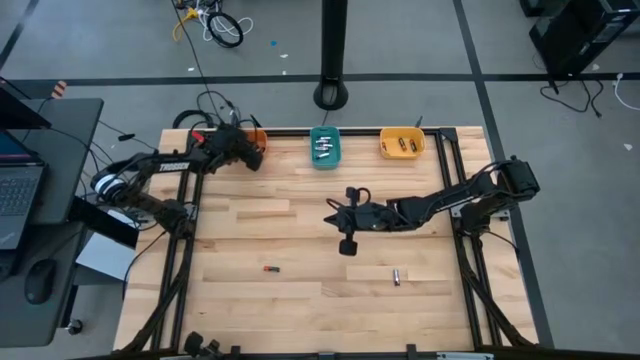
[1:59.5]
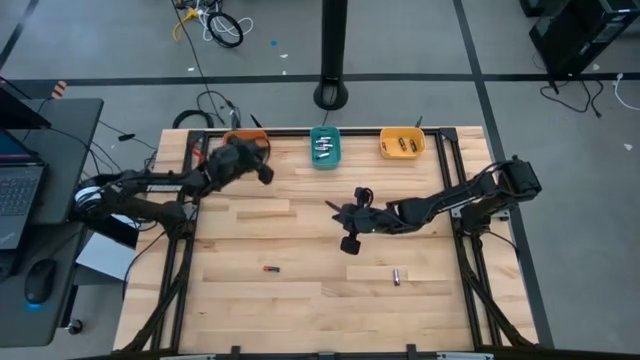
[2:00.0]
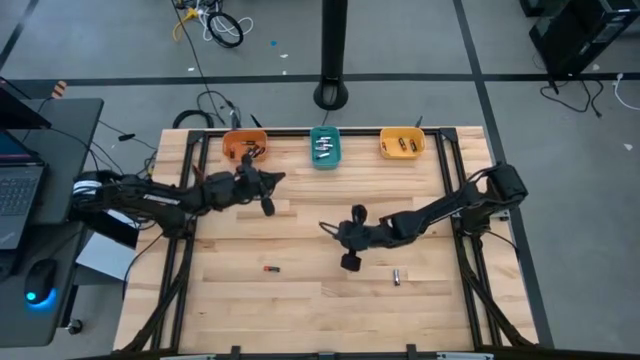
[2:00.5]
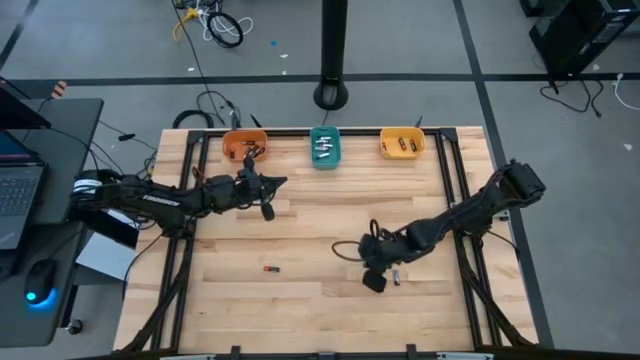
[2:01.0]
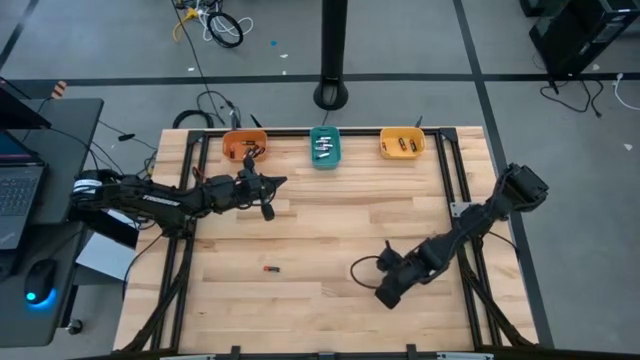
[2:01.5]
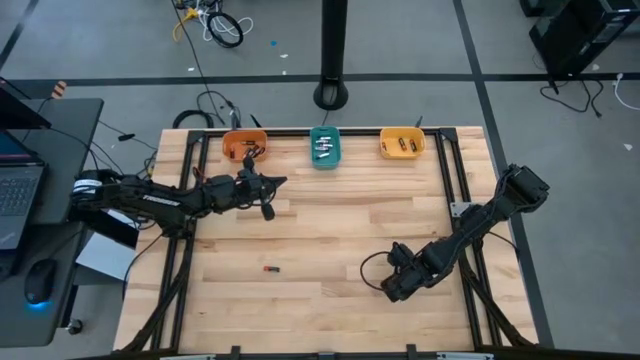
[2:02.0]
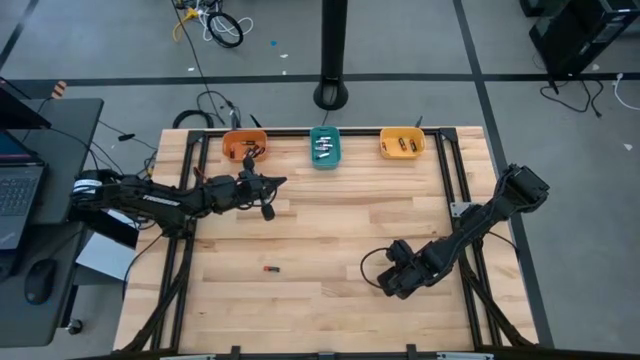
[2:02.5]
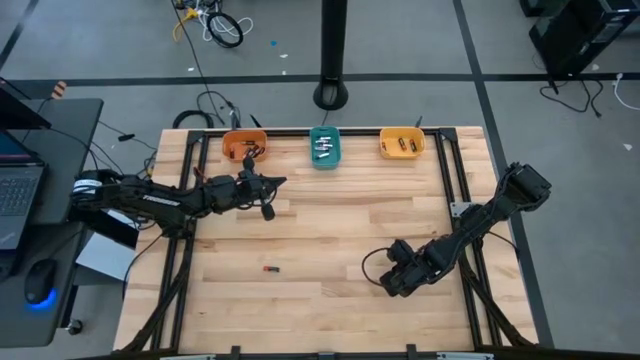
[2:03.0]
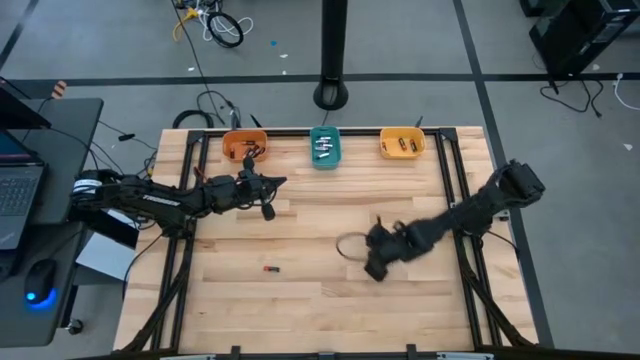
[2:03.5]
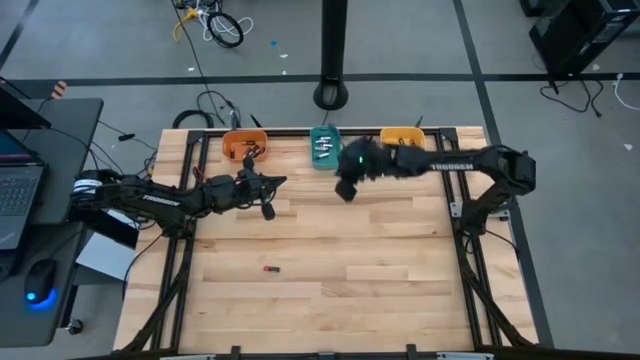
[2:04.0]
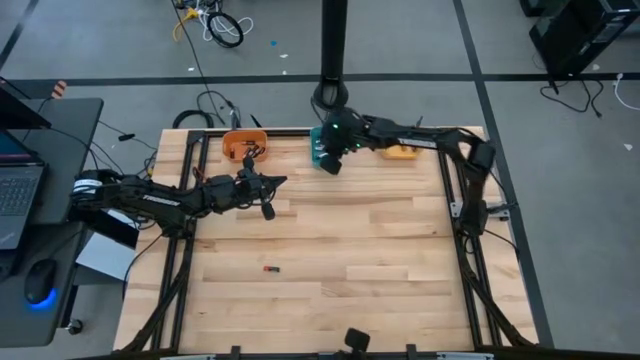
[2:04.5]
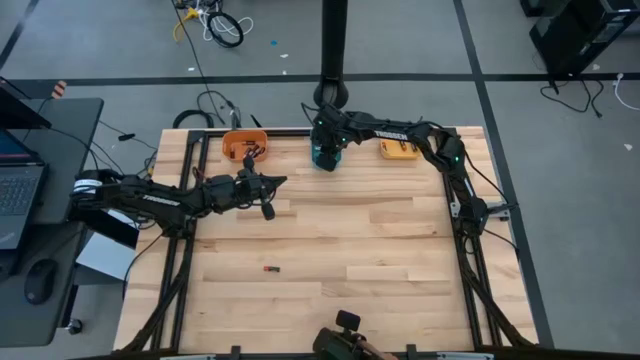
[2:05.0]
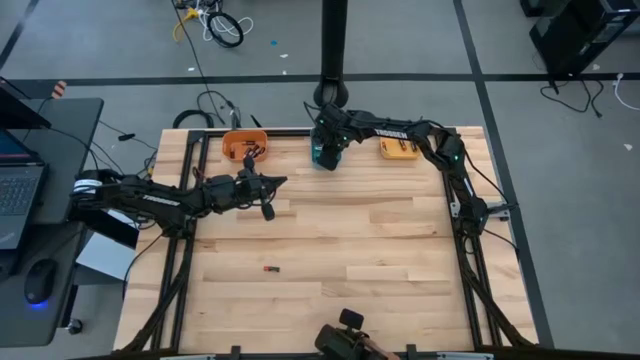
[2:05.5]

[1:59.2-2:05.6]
Task: Sort batteries
Put the black-silver battery in the green bin

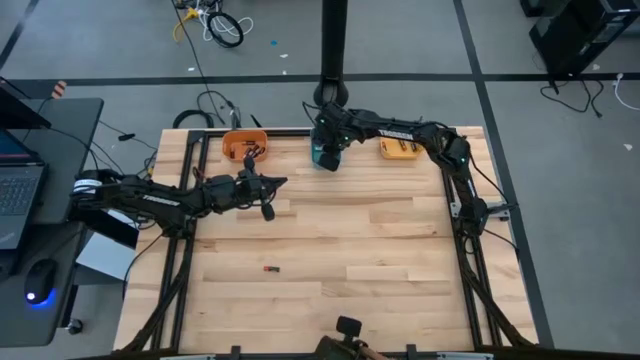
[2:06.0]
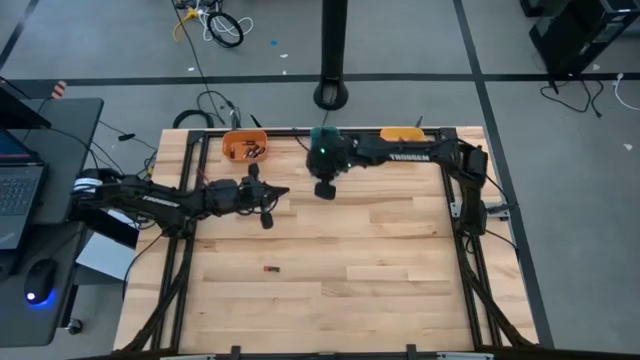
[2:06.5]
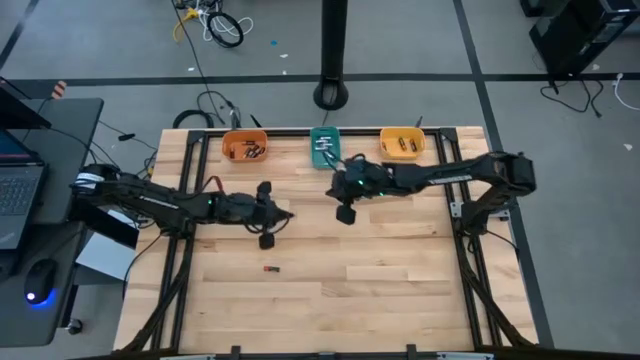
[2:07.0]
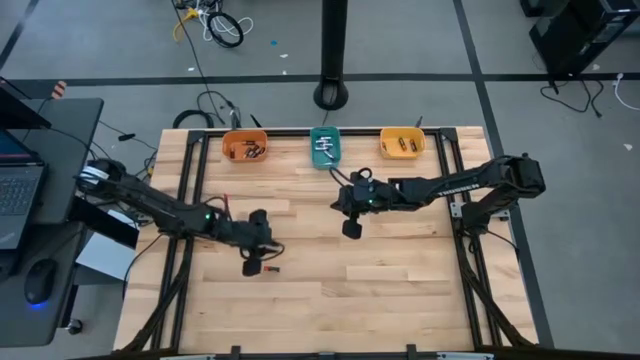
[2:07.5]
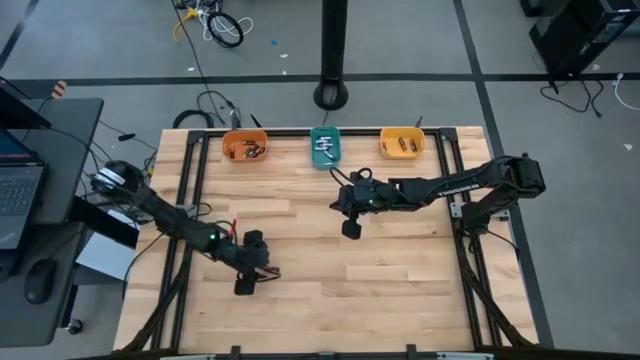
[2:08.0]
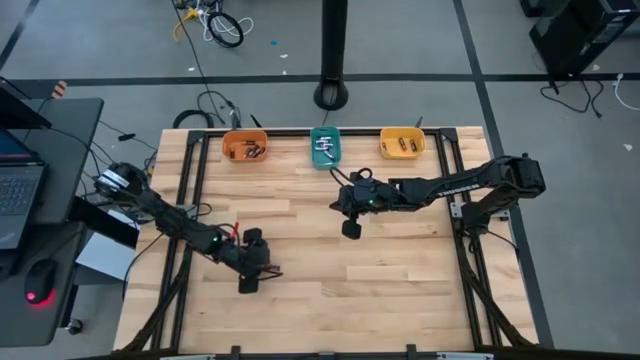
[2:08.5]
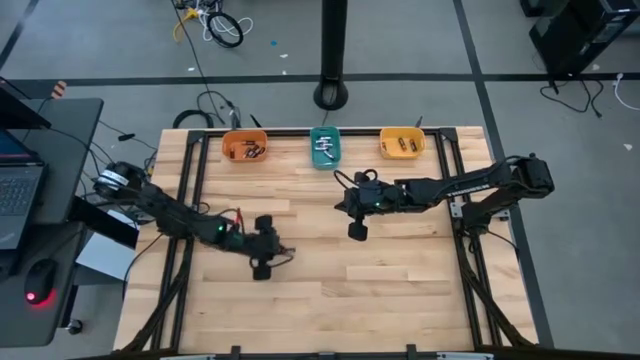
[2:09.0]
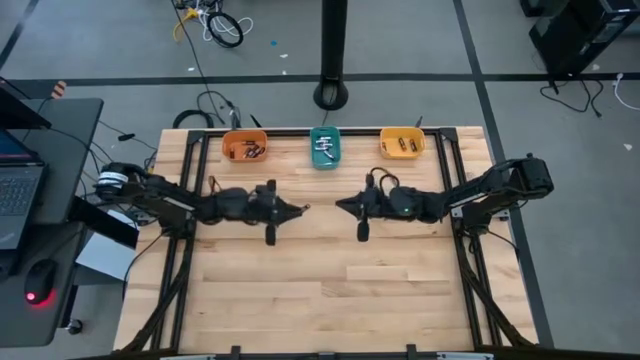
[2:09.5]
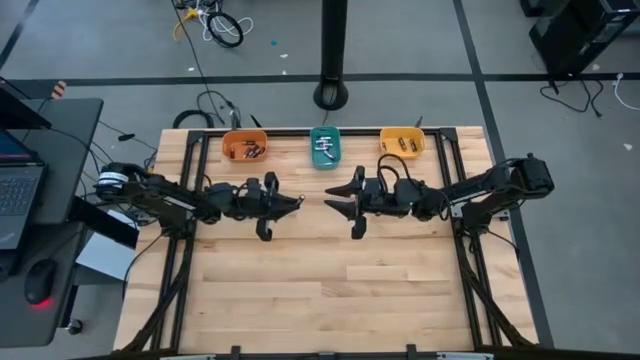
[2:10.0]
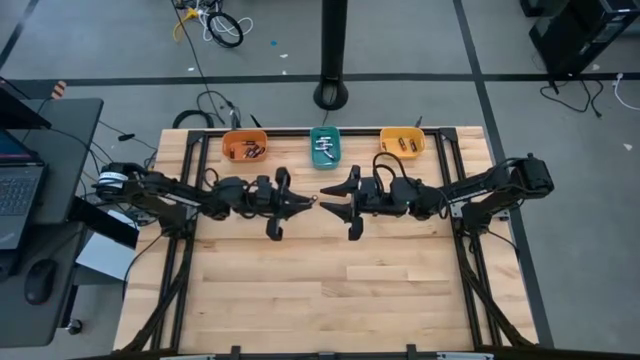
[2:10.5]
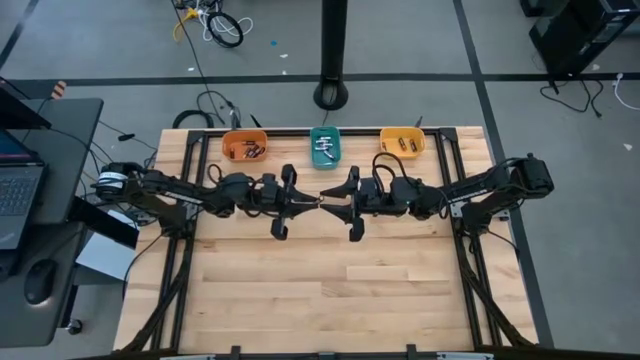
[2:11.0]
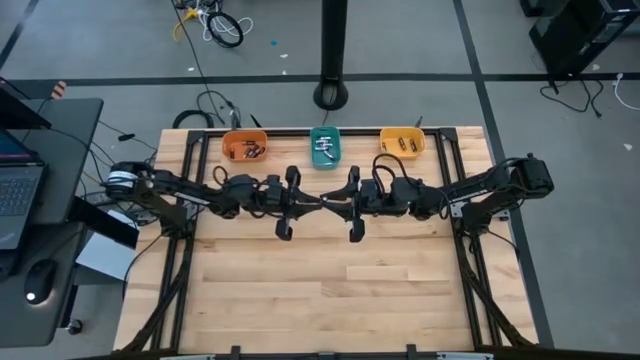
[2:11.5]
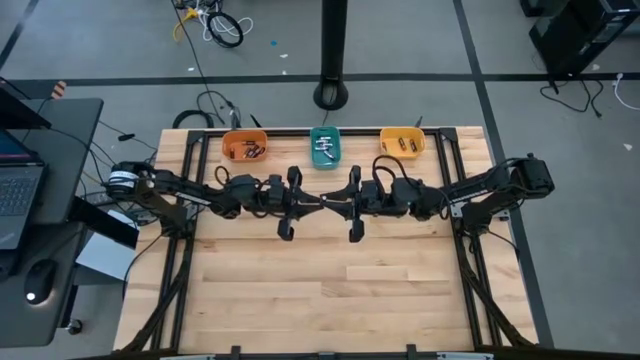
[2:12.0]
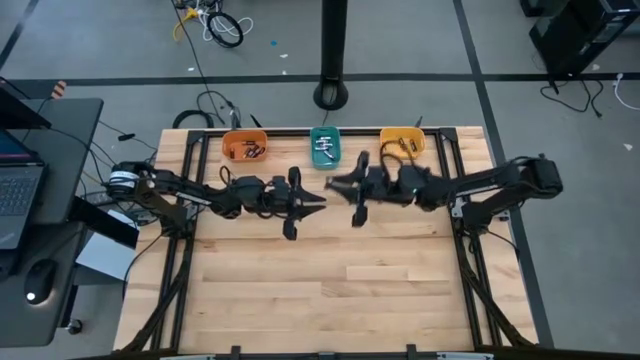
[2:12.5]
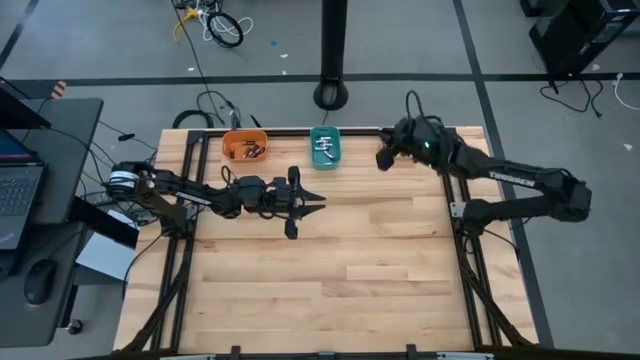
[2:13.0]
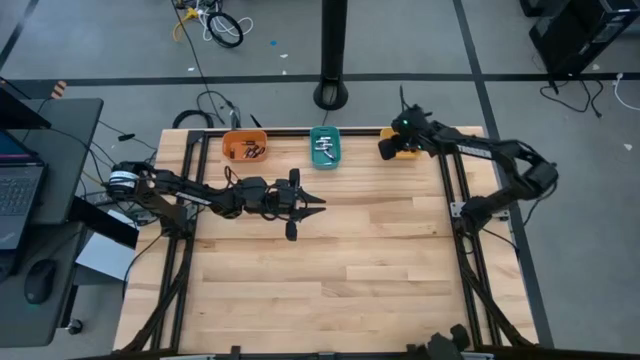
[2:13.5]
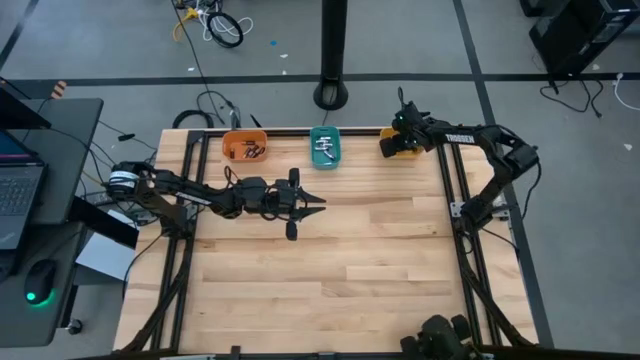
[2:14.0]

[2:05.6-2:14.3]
Put the red-black battery in the yellow bin

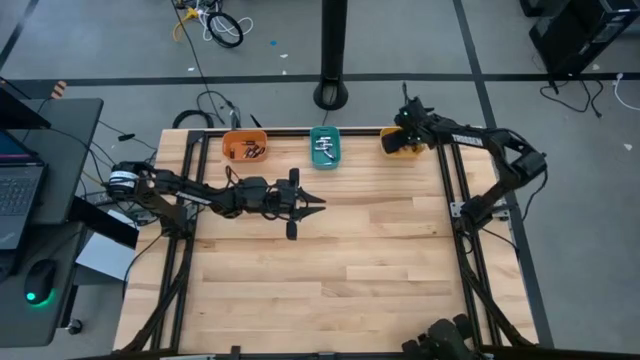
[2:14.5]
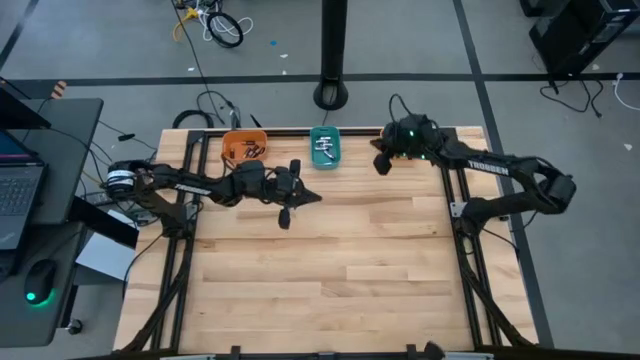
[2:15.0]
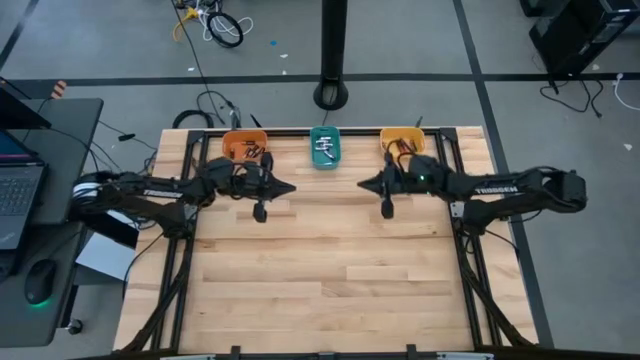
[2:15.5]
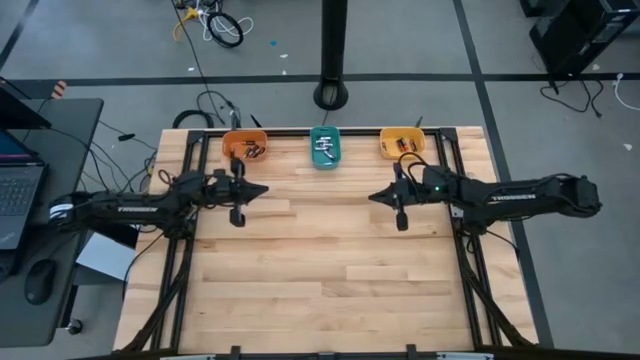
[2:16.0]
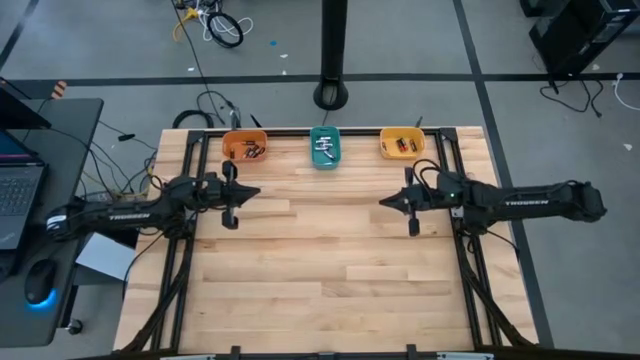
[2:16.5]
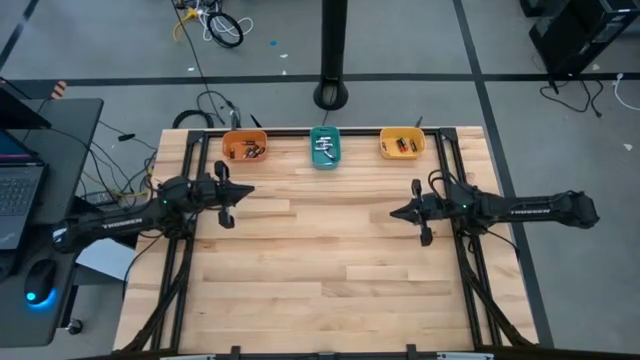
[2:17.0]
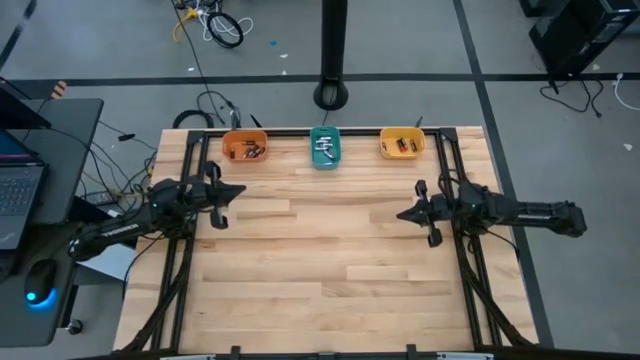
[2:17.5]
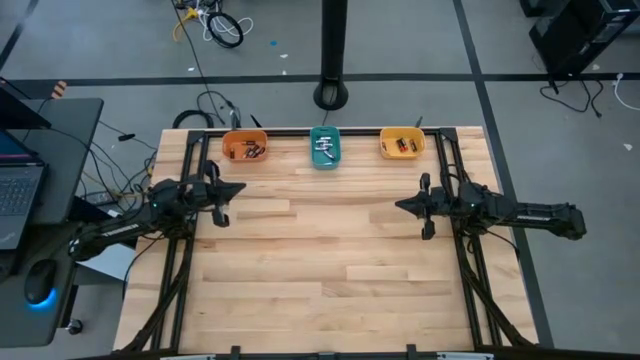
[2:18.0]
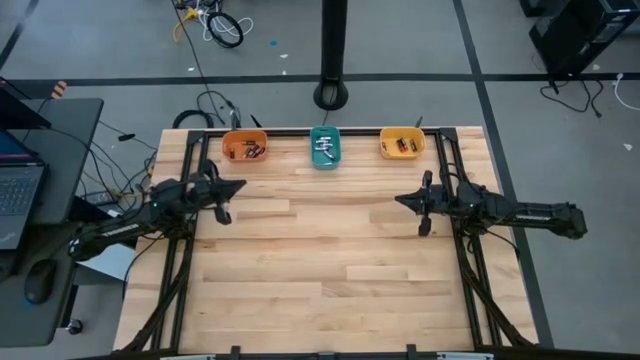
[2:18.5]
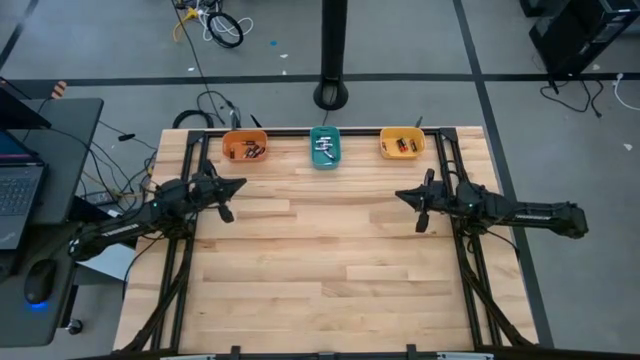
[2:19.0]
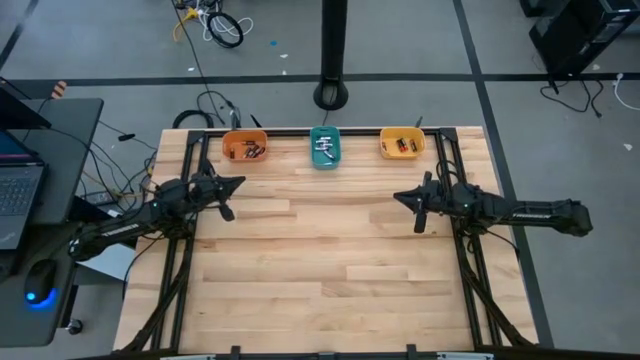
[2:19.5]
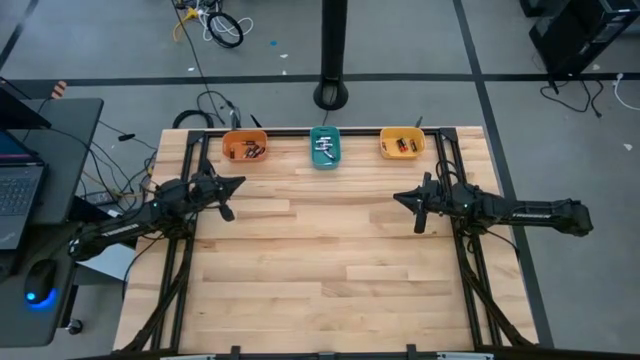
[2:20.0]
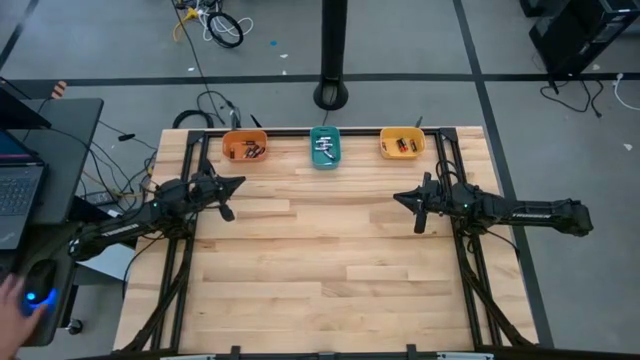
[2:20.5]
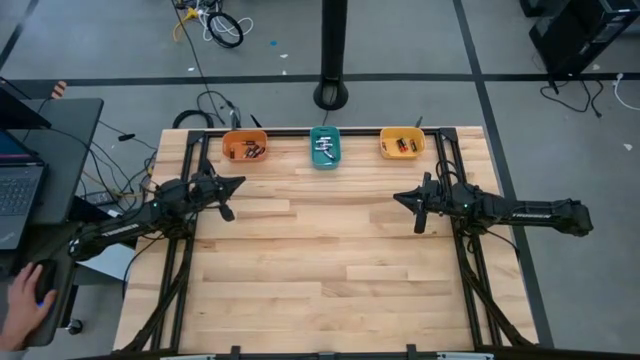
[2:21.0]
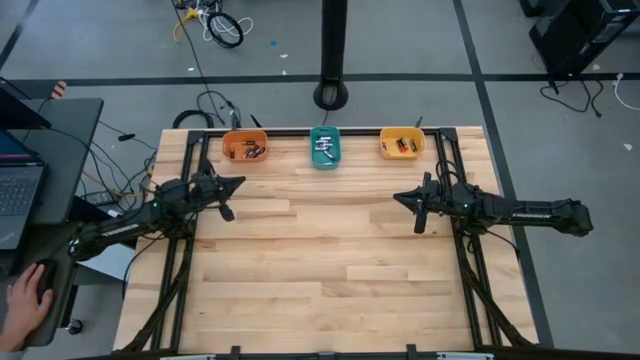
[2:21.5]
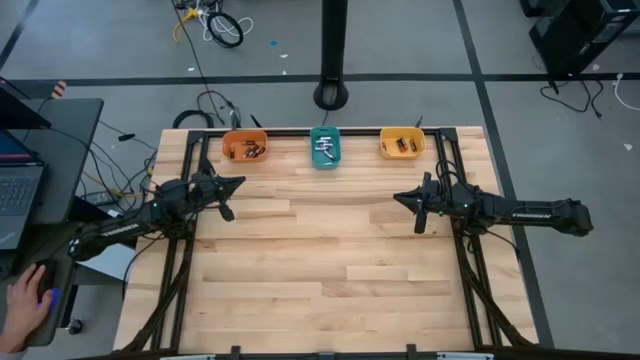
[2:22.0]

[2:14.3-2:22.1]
Return to Home Position
